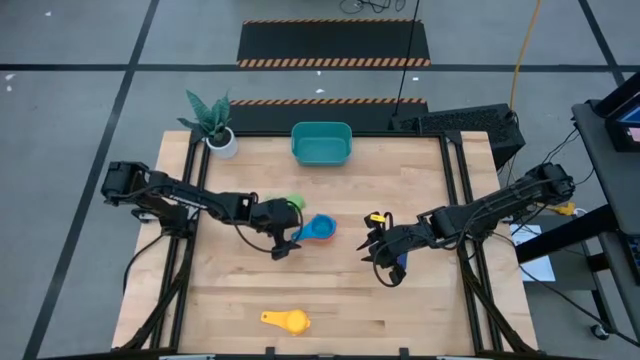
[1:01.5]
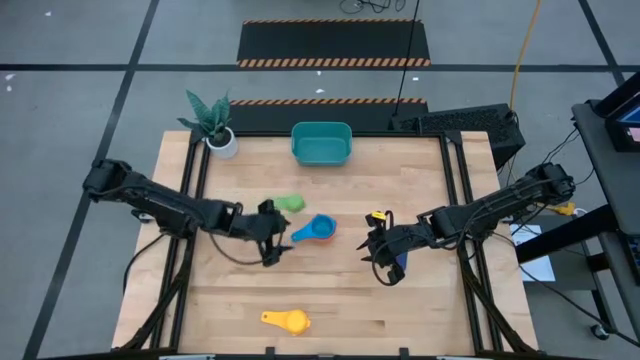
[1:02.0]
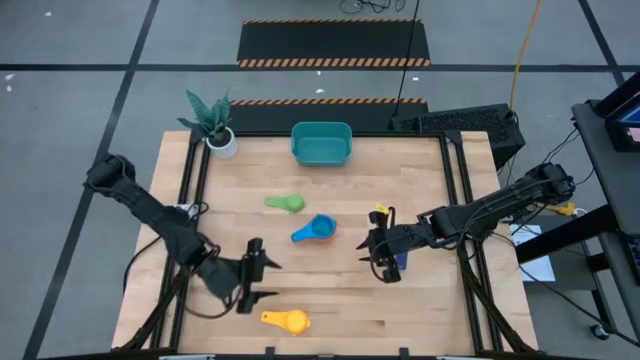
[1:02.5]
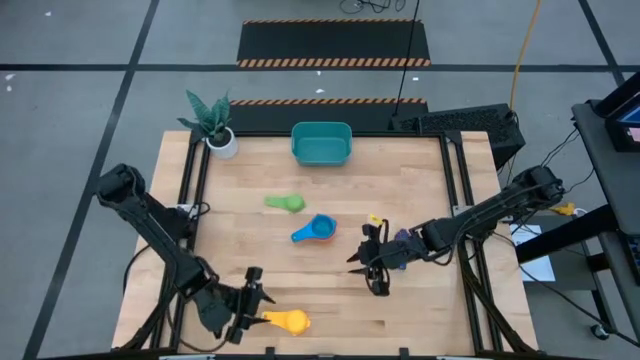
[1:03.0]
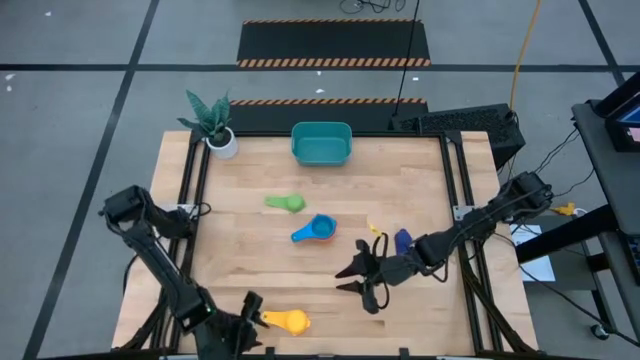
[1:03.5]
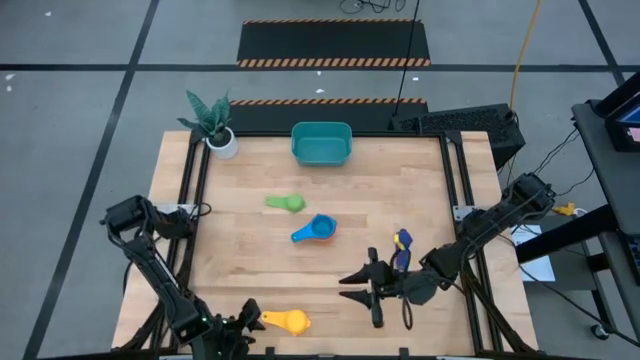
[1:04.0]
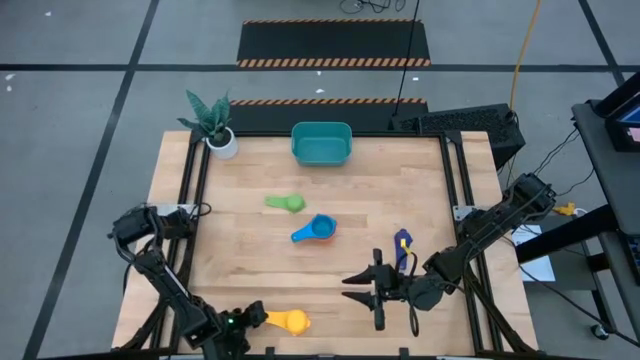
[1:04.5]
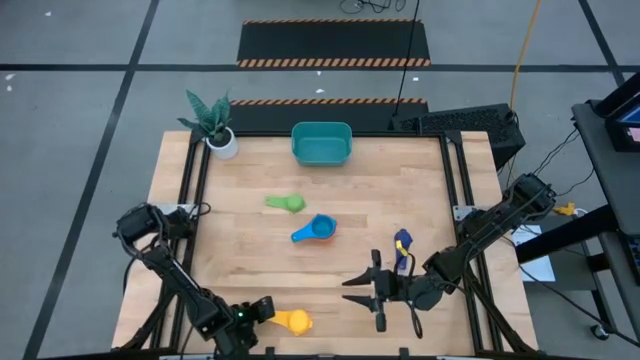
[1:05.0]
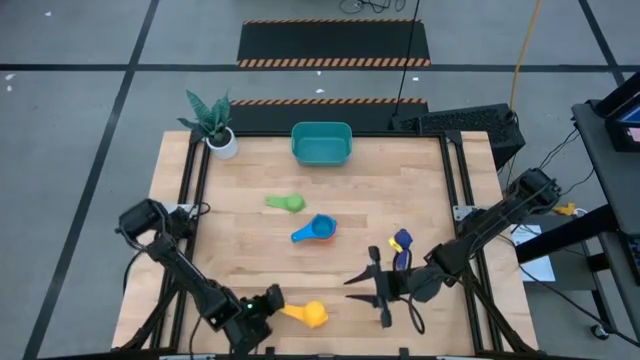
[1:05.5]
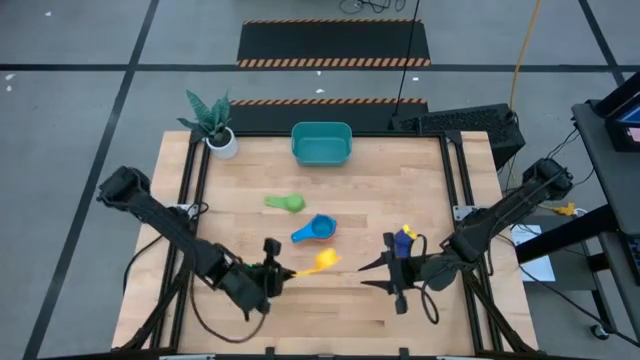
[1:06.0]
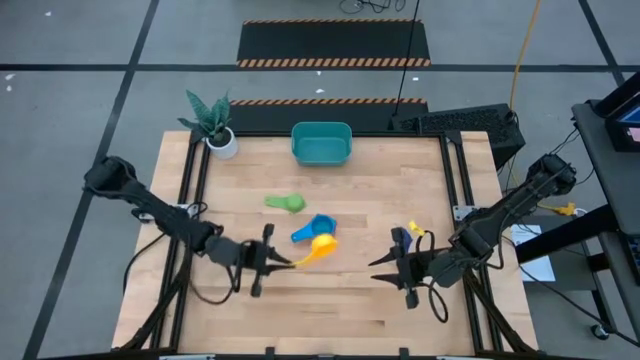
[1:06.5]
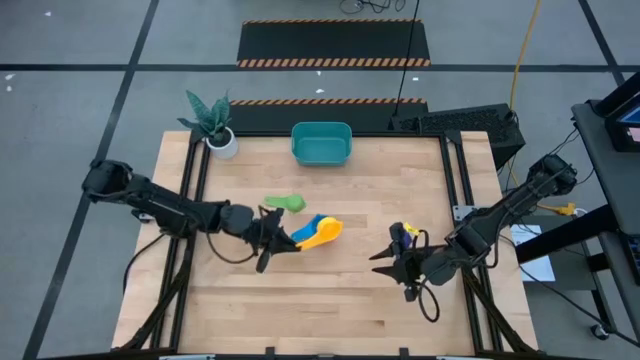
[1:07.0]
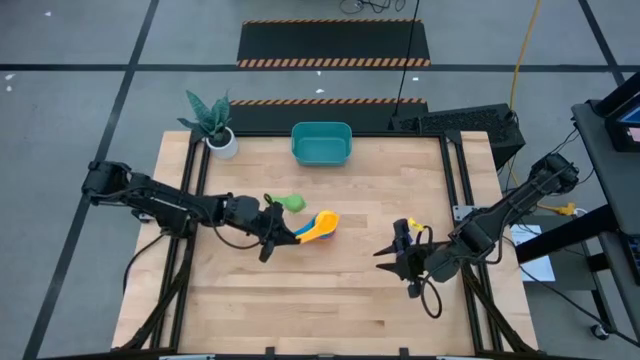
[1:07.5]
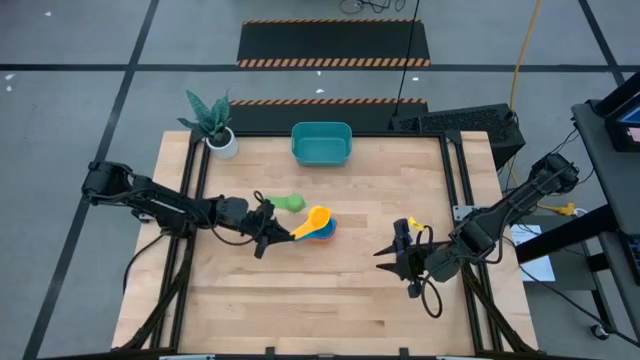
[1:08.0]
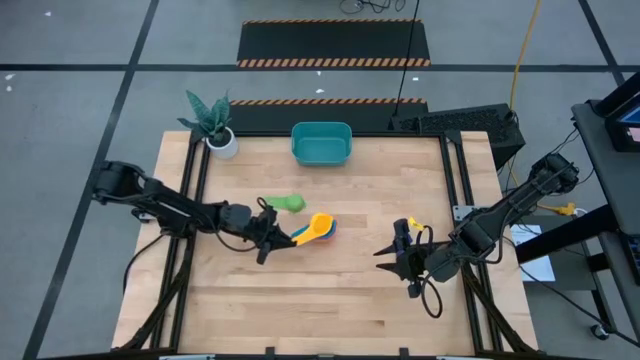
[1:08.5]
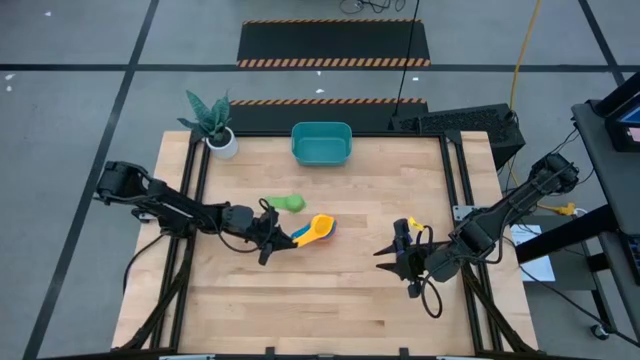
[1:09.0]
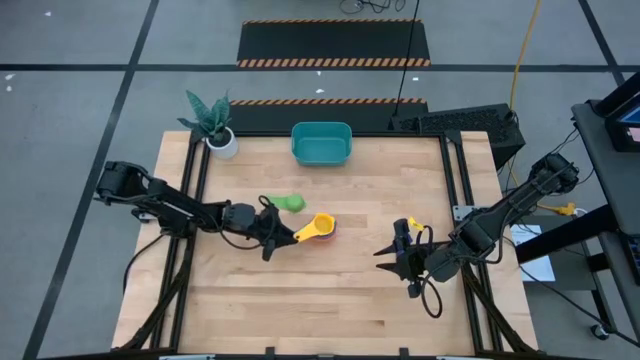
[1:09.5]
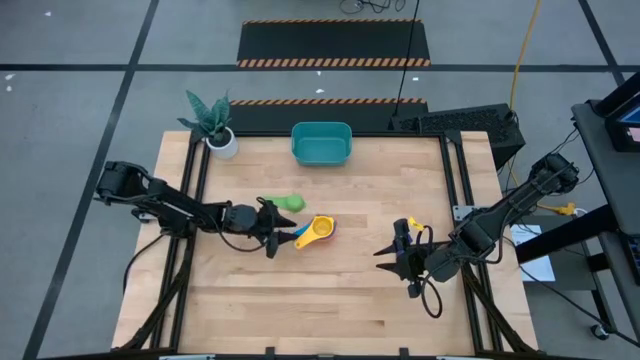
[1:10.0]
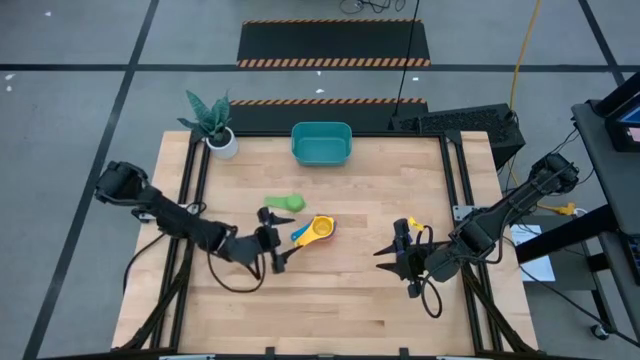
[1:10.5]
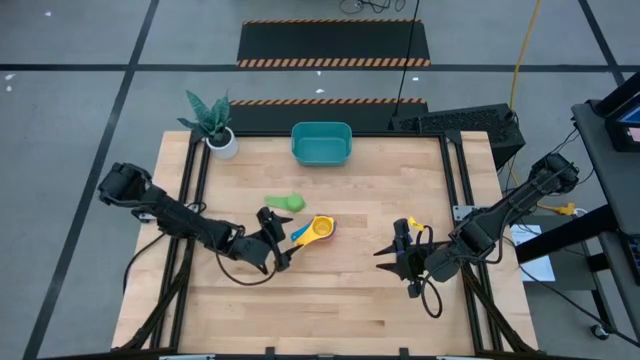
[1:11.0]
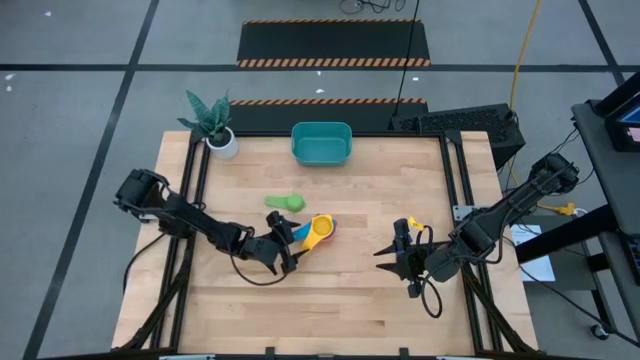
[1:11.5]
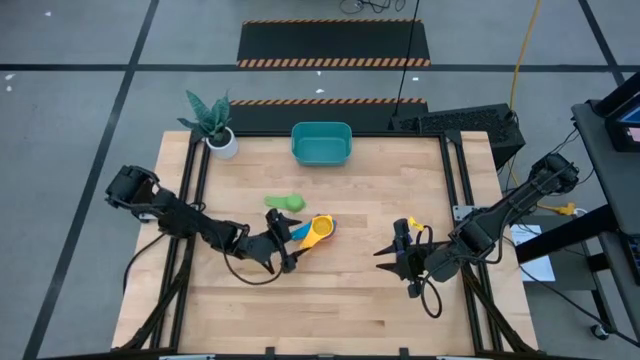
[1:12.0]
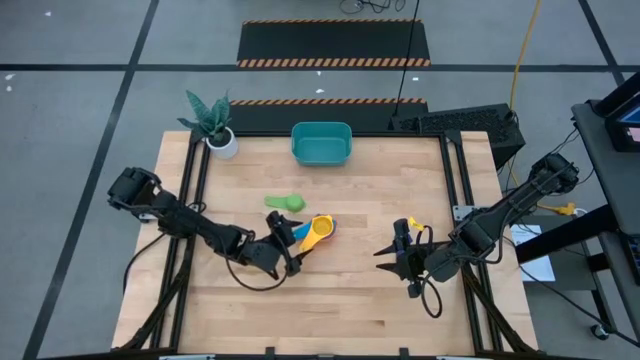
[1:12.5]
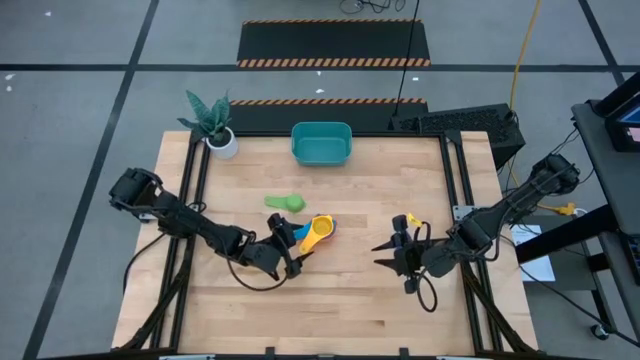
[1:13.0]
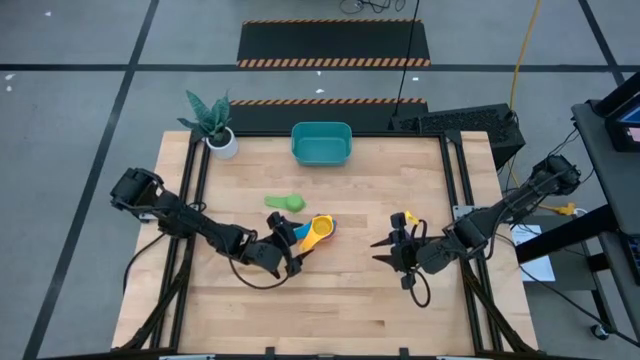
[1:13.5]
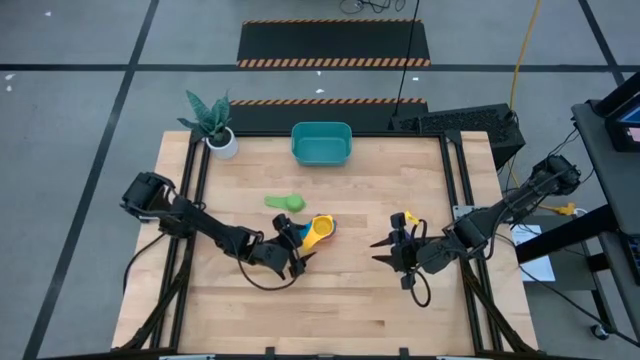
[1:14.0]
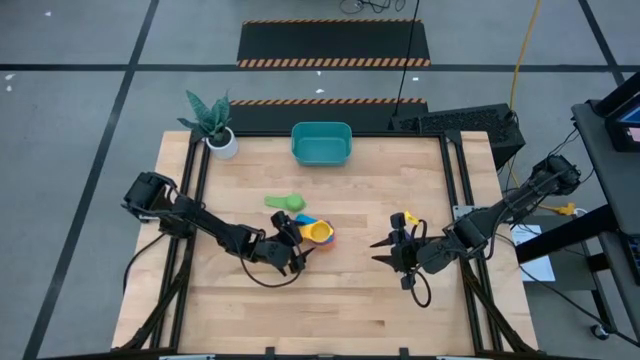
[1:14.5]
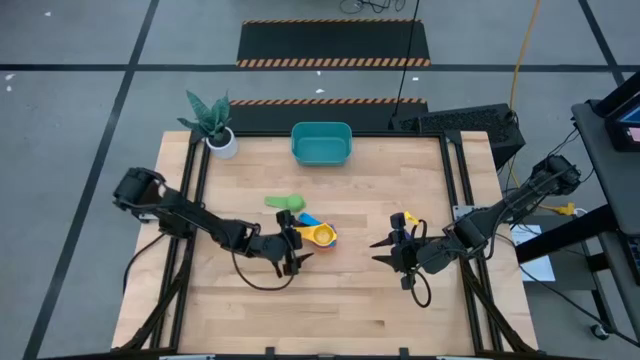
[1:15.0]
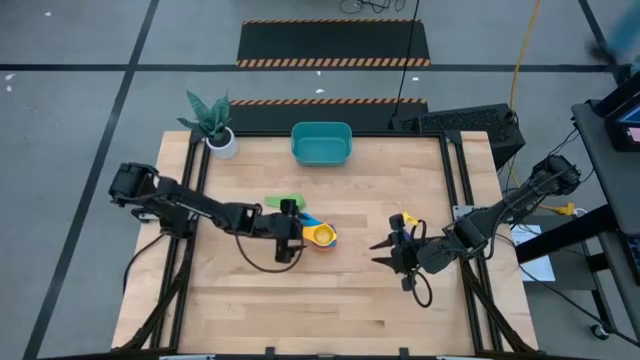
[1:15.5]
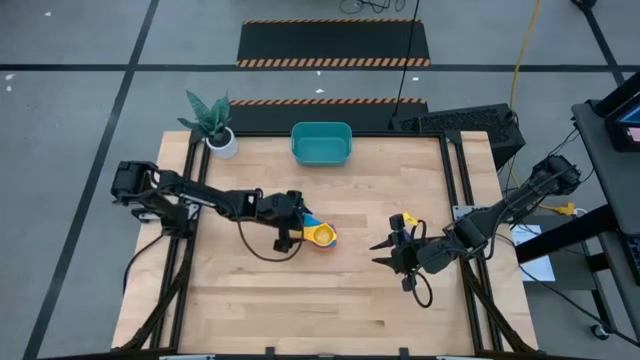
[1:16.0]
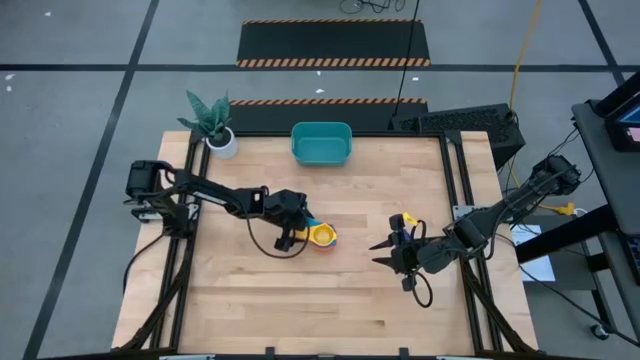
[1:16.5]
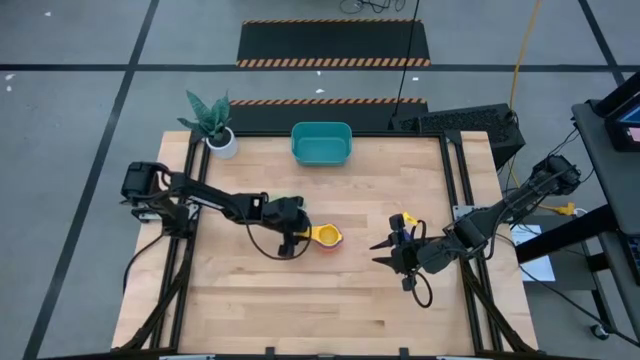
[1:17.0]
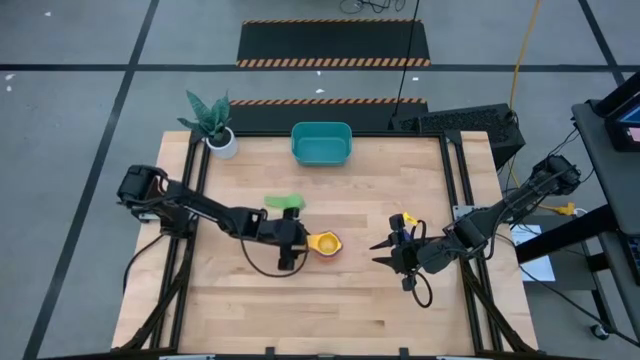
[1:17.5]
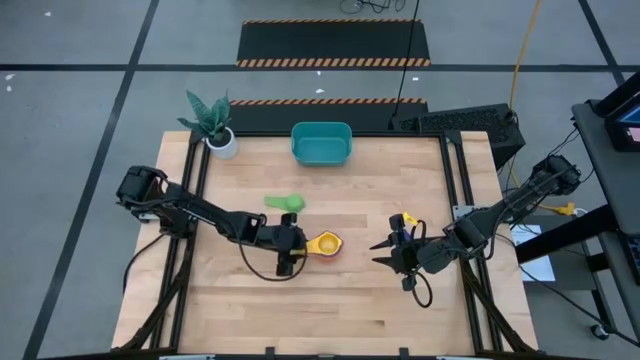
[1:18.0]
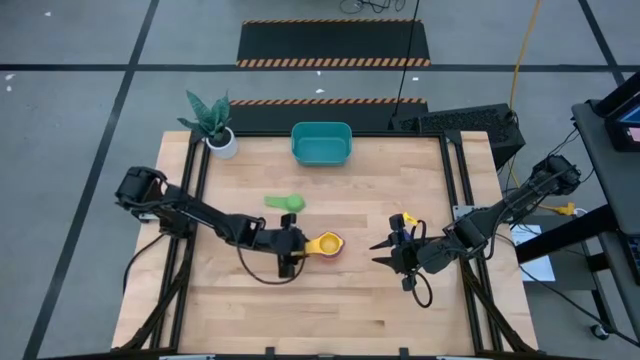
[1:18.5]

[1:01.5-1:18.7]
Task: Nest measuring cups in basket
Stack the yellow measuring cup on top of the light blue measuring cup

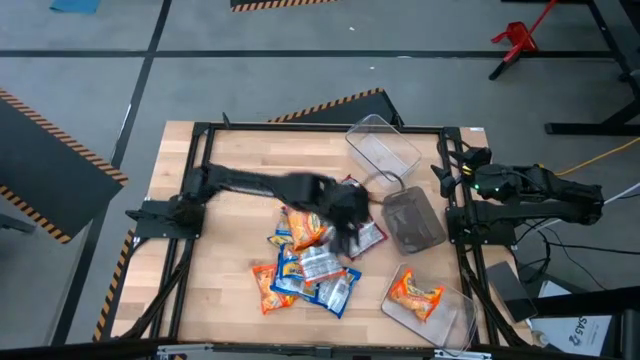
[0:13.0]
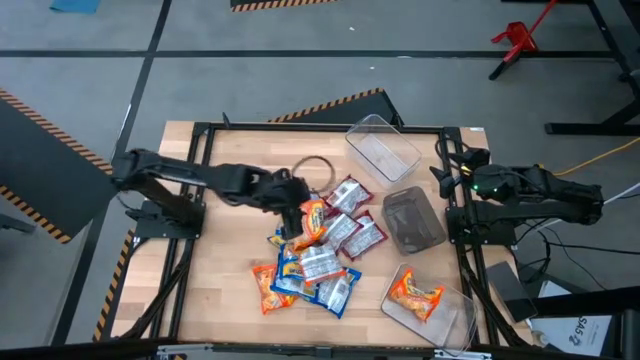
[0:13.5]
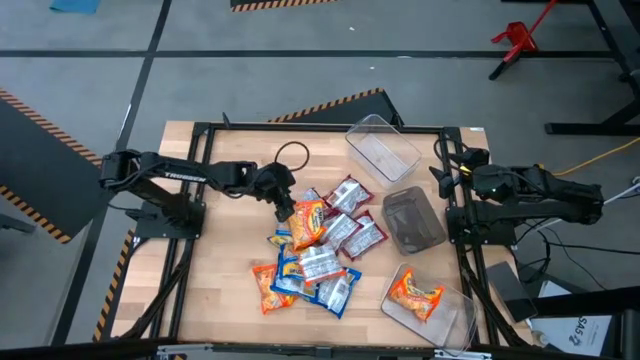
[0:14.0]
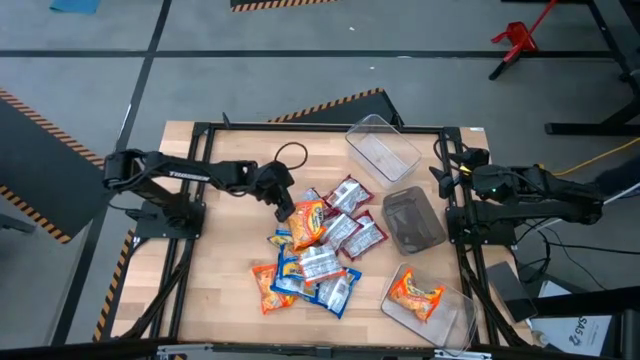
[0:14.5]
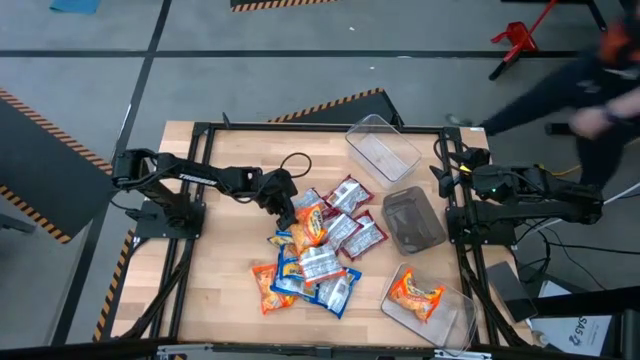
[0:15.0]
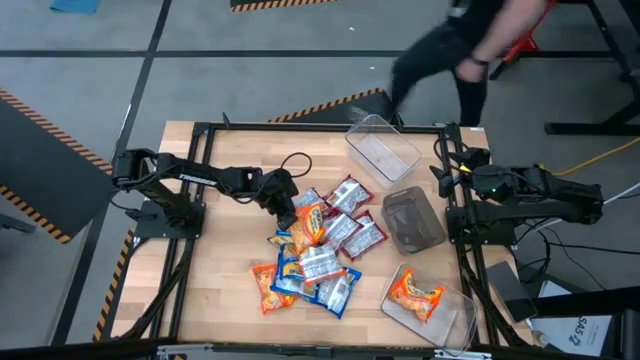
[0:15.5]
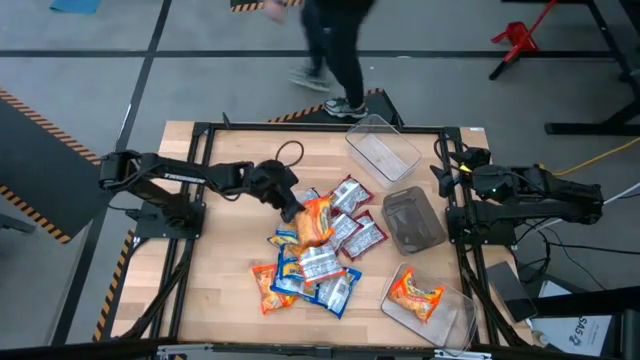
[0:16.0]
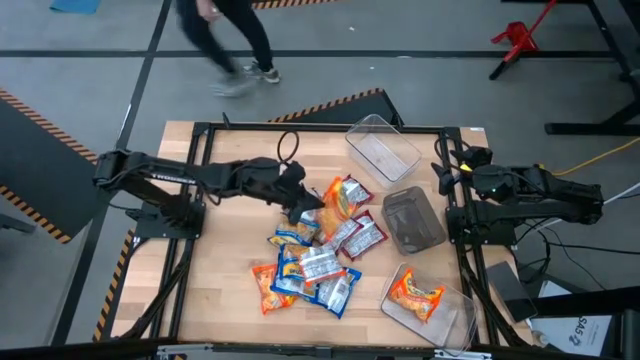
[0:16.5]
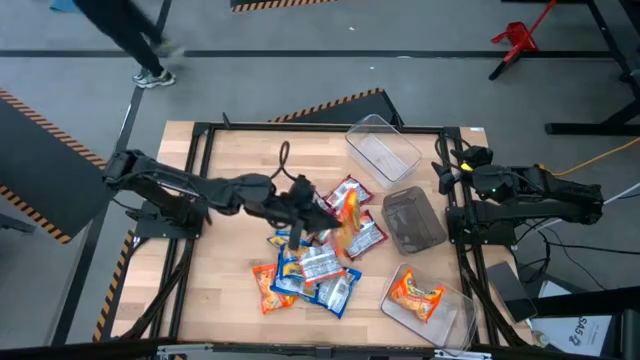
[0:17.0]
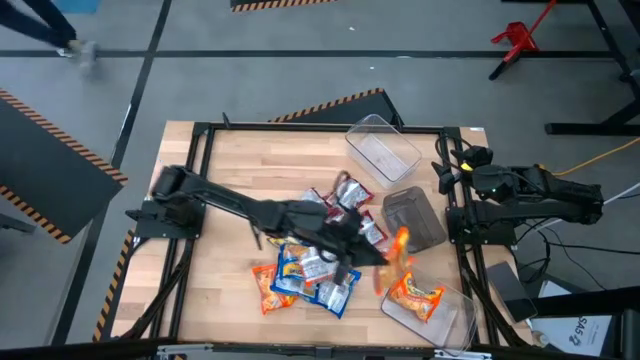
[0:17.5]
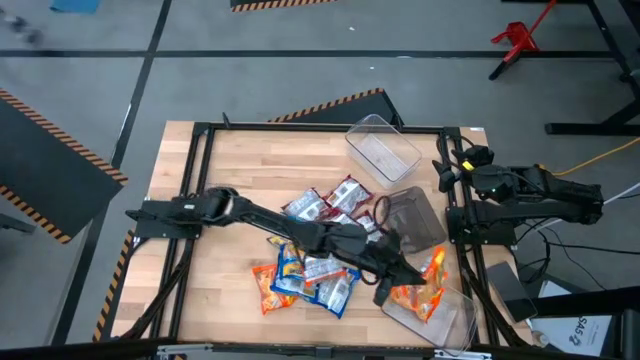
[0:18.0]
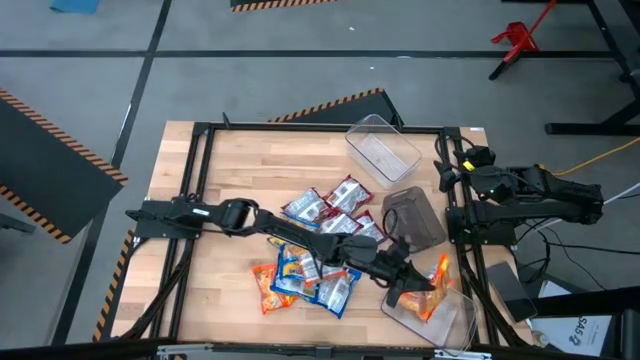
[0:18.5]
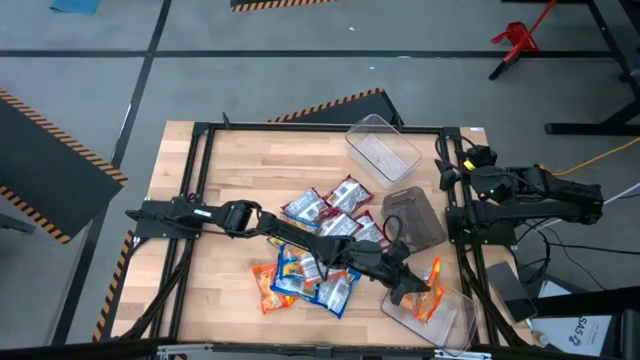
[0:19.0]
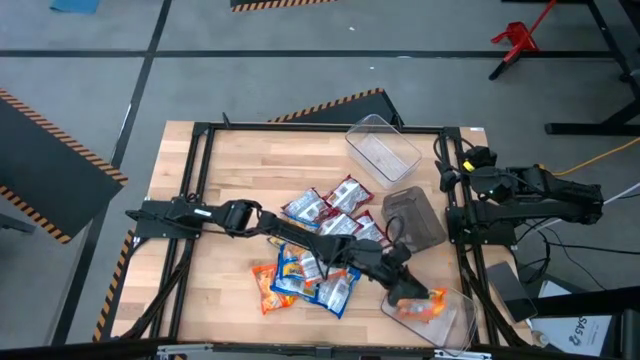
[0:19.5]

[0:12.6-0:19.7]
Task: Sort Maruchan noodles
Put the orange bag into the bottom transparent bin
